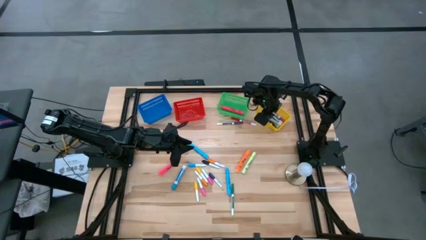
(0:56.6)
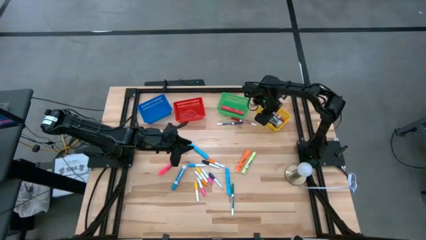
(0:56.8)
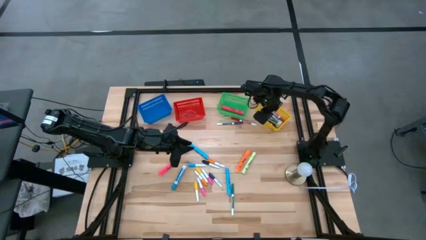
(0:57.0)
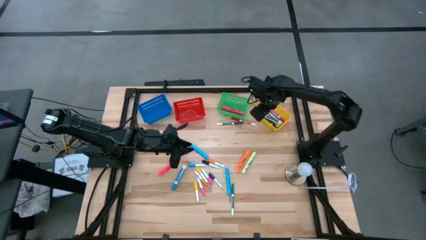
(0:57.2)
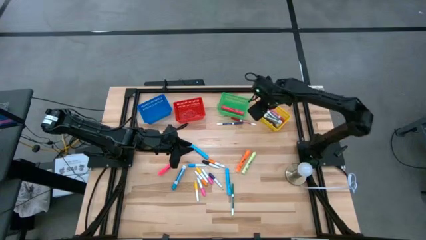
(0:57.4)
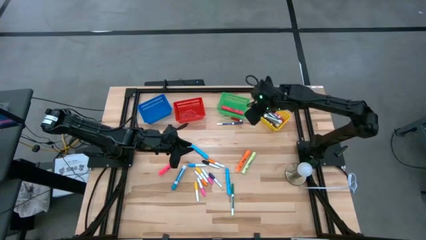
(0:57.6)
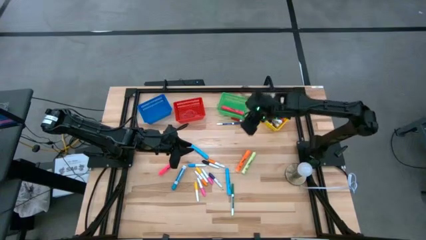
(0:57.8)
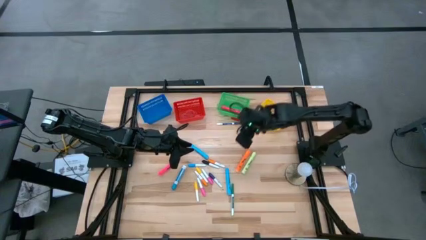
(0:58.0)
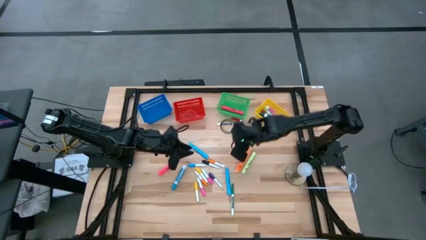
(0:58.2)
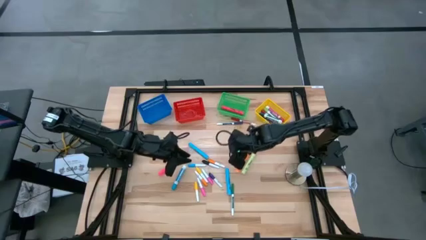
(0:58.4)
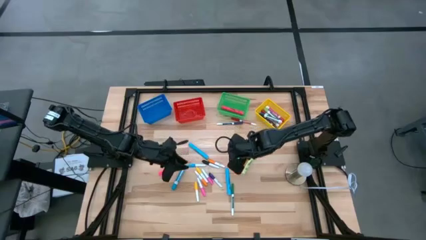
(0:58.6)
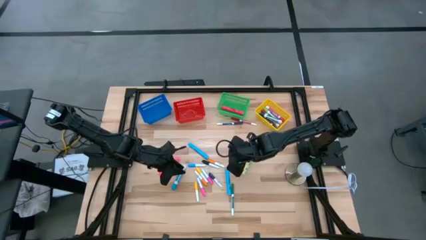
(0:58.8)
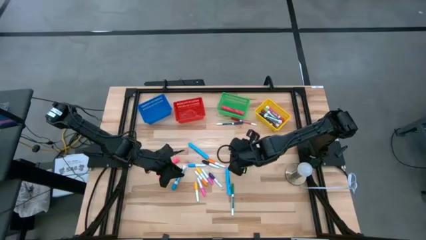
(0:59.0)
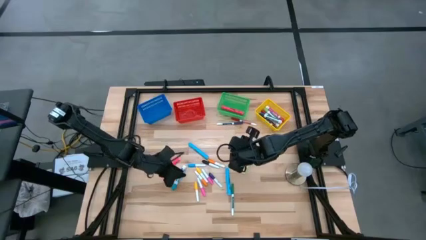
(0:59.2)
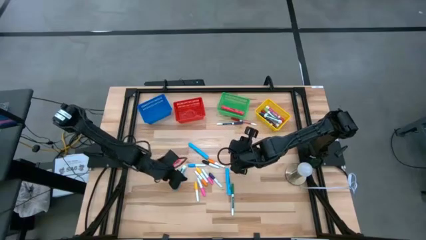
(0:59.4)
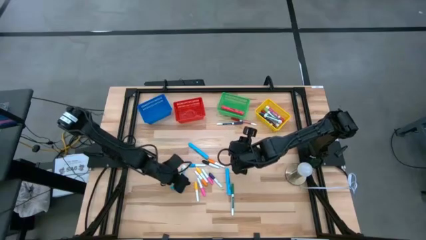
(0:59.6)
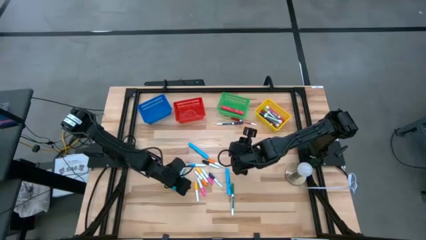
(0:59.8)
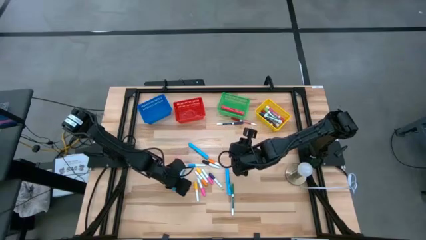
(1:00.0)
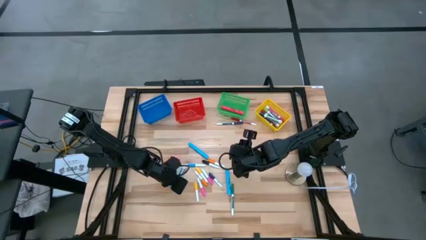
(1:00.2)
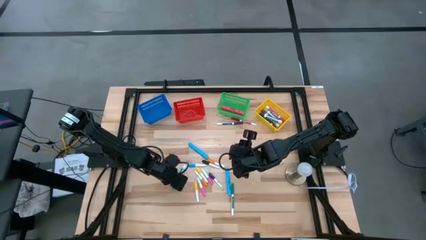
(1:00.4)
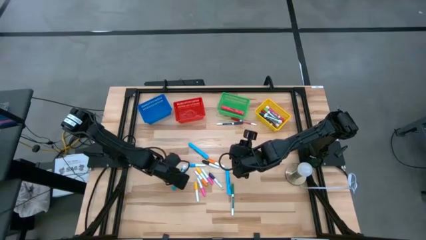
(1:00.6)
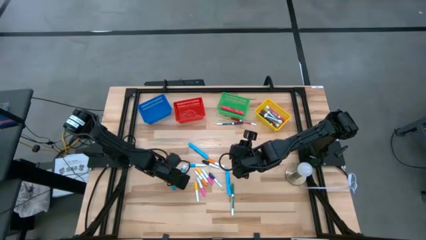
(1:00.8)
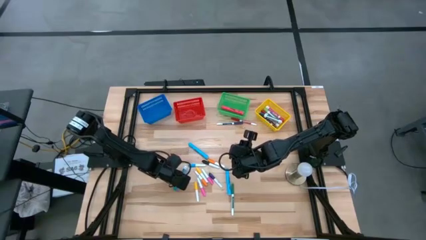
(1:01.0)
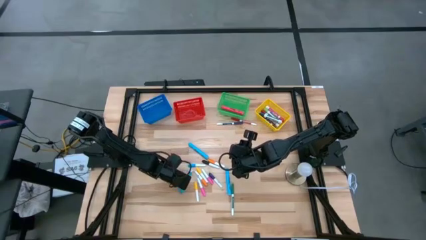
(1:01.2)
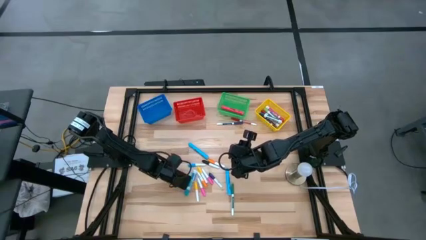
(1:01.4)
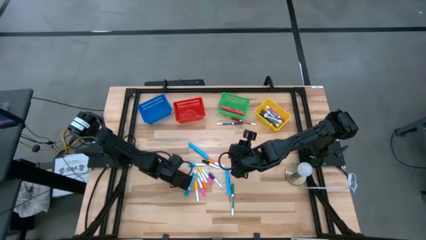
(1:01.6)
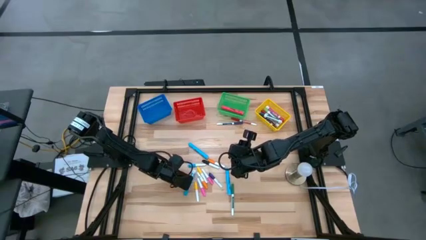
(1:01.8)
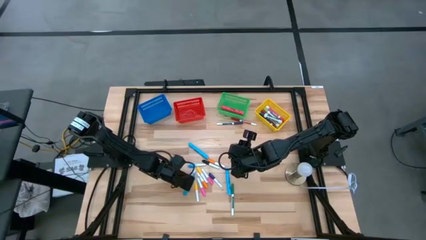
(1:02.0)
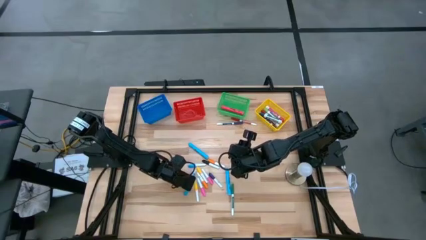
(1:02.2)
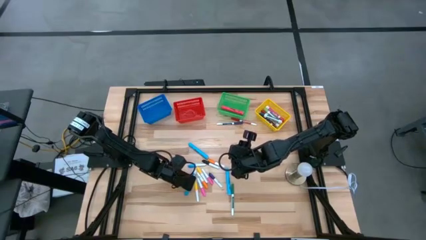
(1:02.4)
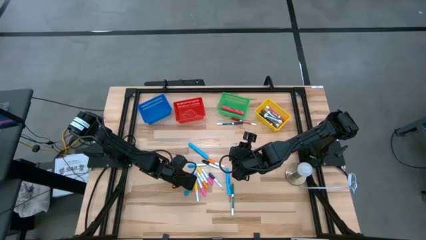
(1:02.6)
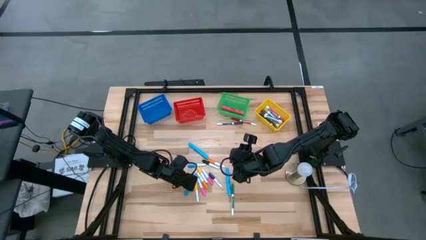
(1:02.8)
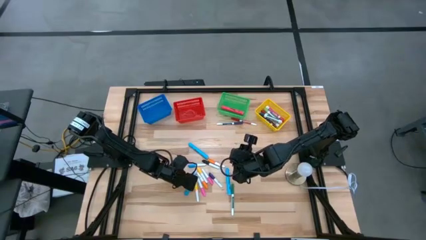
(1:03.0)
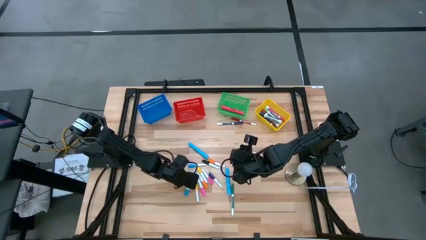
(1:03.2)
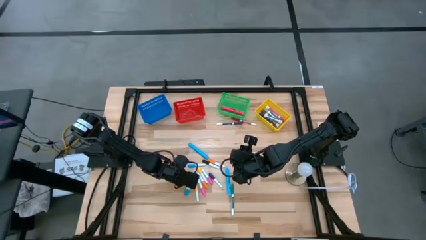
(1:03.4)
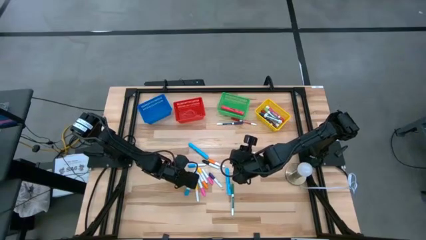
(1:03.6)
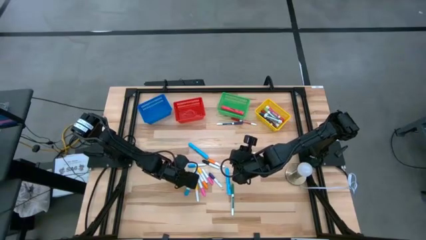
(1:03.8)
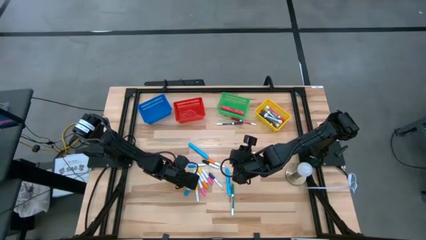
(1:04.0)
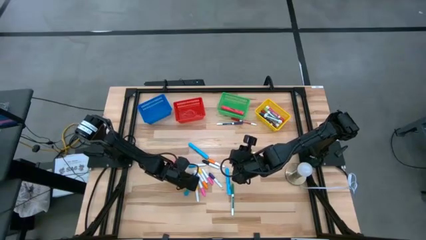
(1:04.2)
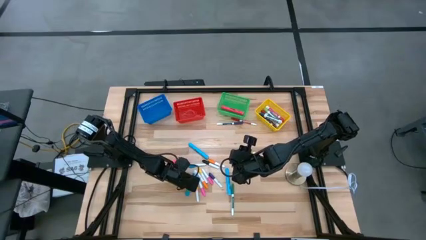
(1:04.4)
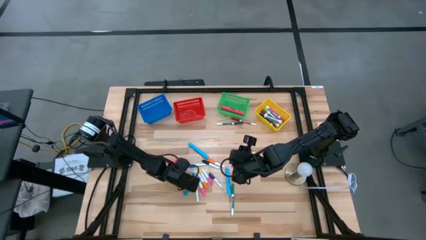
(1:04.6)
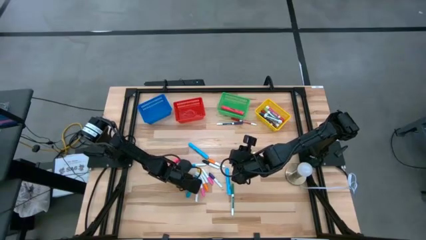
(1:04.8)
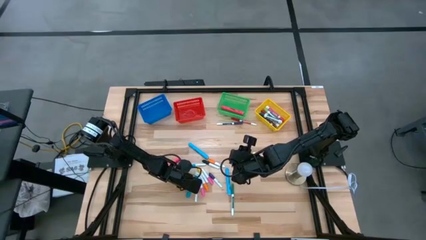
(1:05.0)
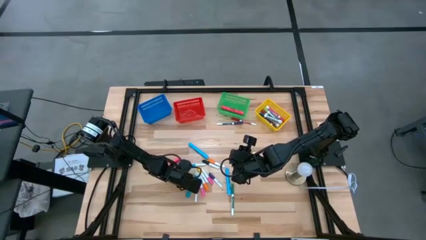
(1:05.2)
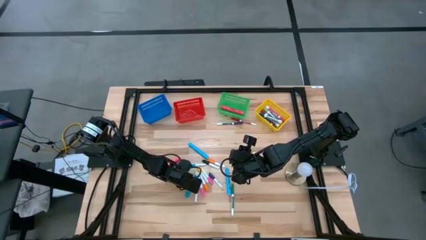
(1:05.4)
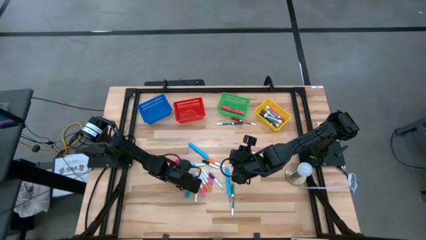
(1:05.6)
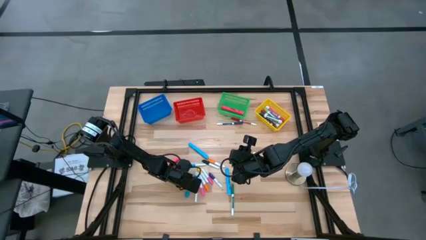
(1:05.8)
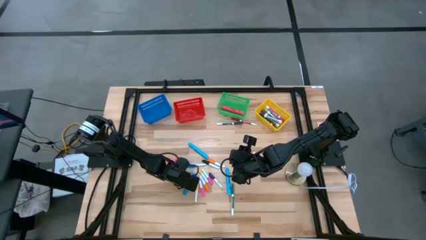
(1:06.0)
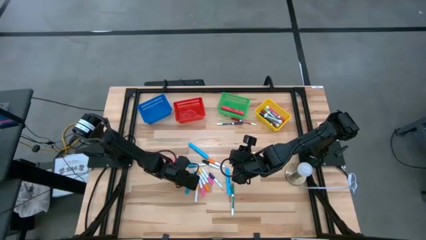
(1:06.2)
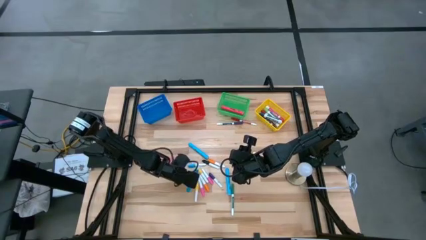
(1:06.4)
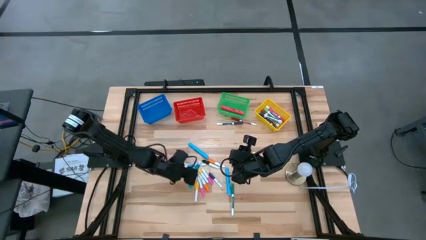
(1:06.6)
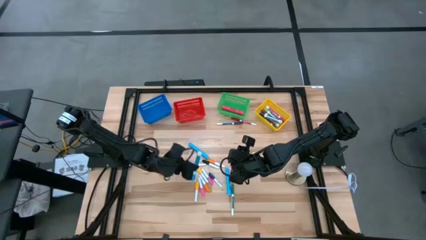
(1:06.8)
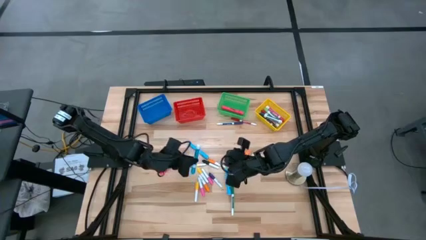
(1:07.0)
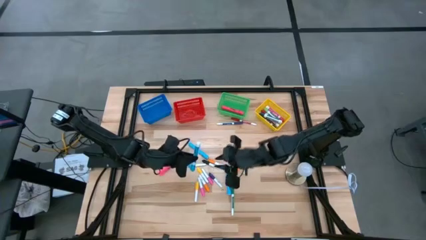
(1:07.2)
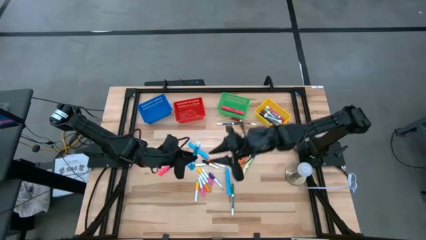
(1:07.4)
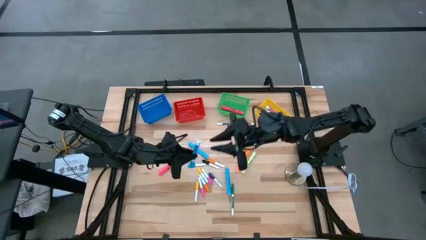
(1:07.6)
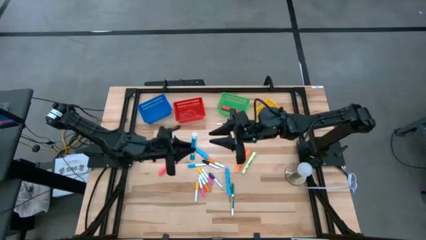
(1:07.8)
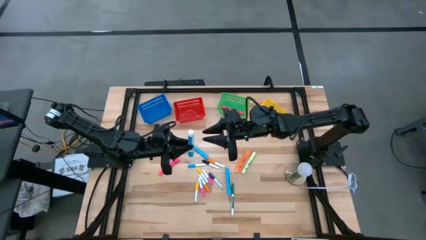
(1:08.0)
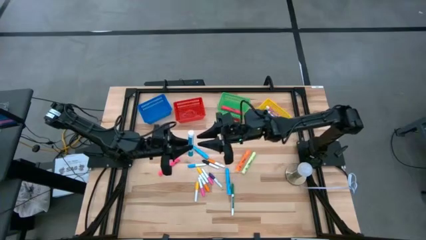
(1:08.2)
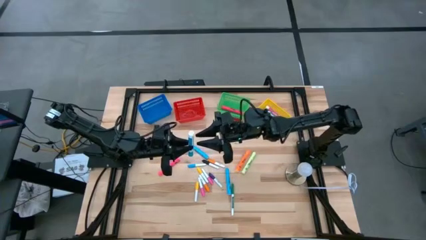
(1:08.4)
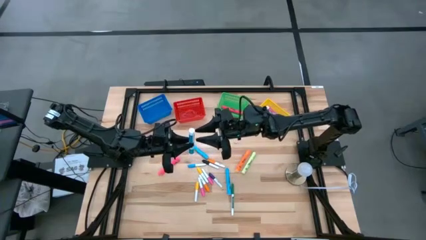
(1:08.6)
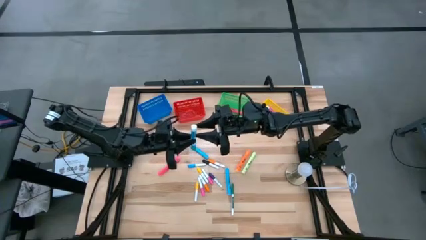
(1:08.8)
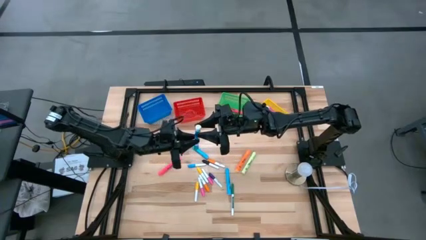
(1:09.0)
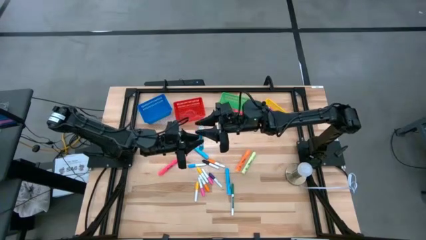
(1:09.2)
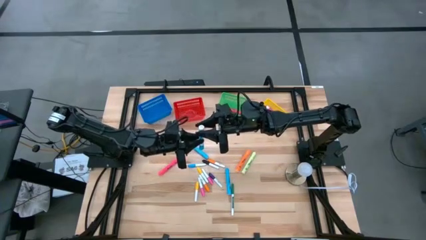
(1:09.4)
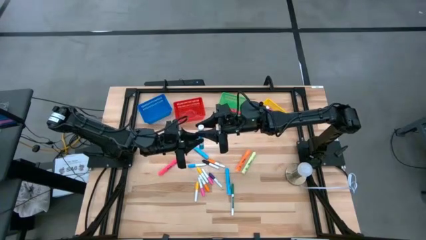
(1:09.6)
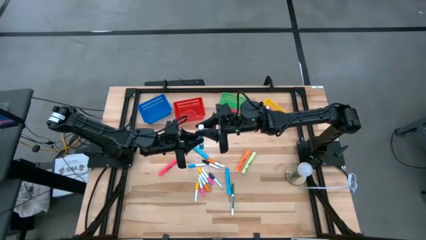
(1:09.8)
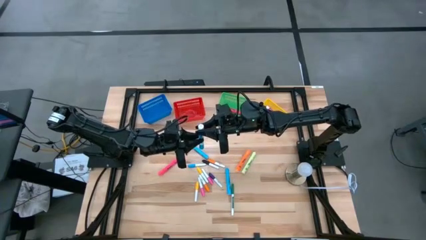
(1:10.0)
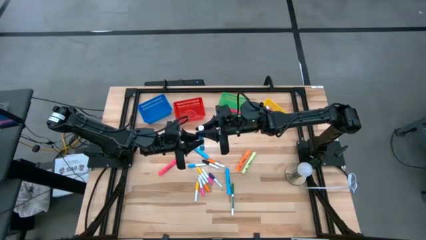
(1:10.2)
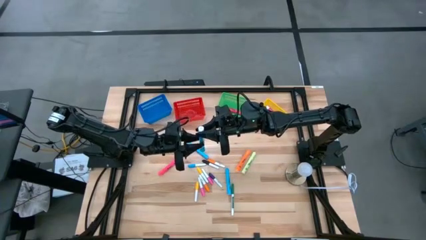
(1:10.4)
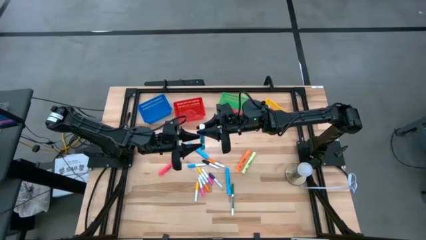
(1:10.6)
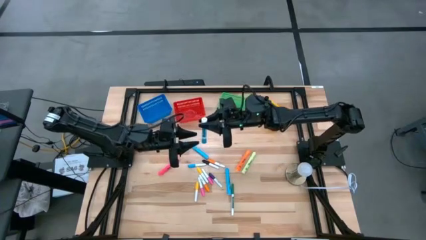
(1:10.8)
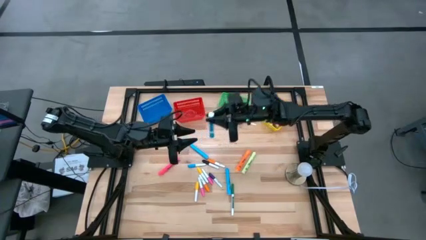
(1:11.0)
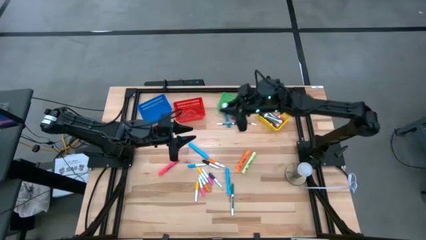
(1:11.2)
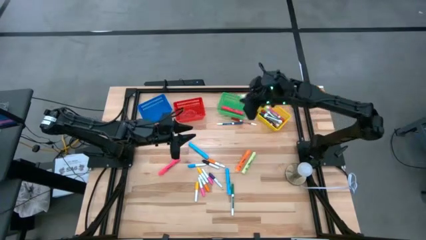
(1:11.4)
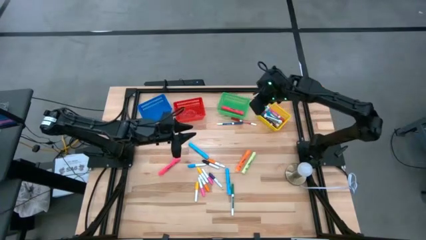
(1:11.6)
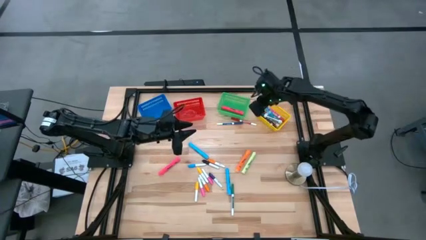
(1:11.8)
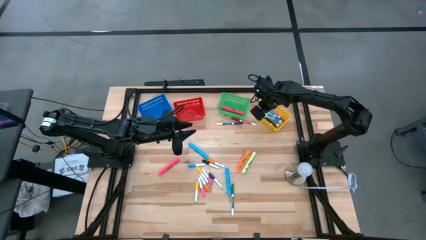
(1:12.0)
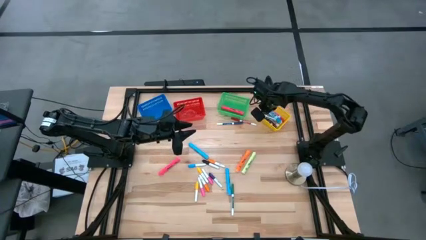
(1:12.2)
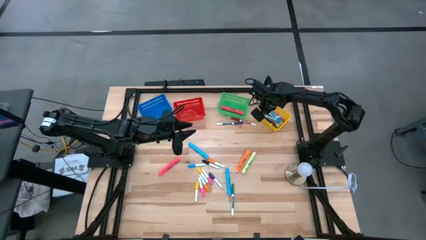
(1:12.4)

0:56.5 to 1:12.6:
Task: Pick & Place Markers
Put the large light blue marker pen into the yellow bin

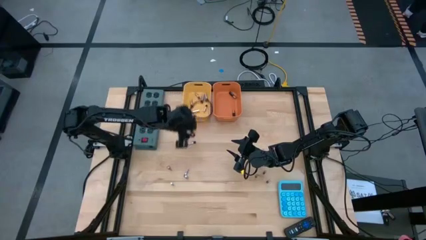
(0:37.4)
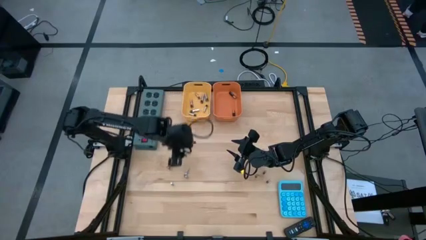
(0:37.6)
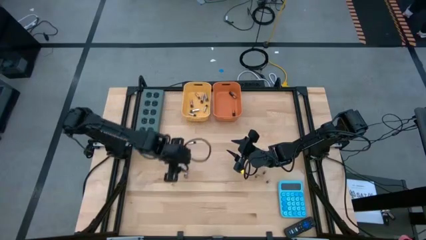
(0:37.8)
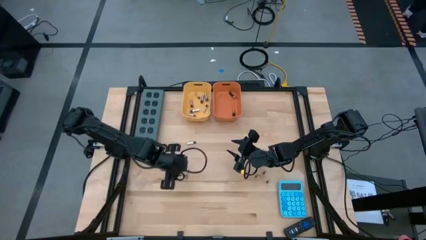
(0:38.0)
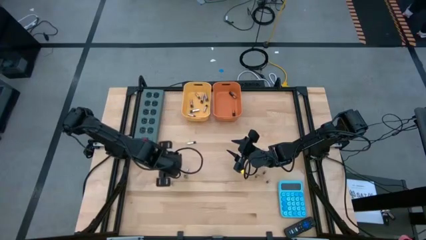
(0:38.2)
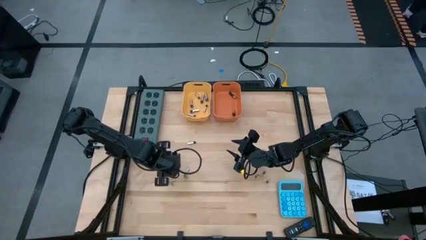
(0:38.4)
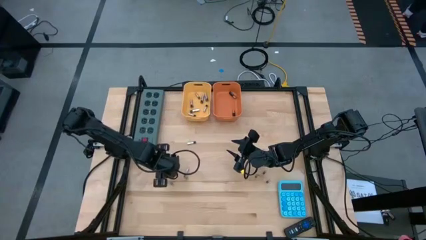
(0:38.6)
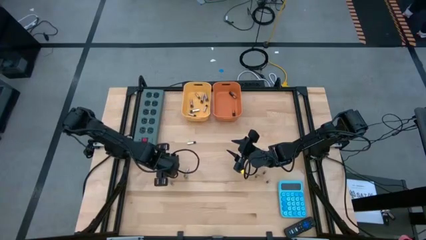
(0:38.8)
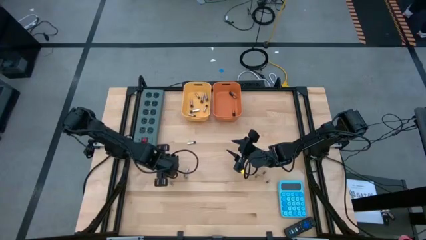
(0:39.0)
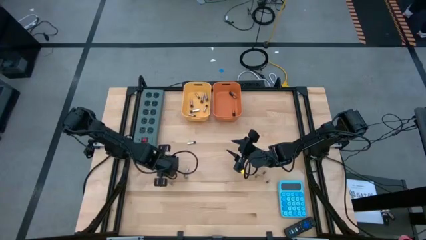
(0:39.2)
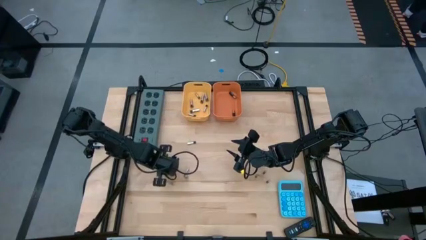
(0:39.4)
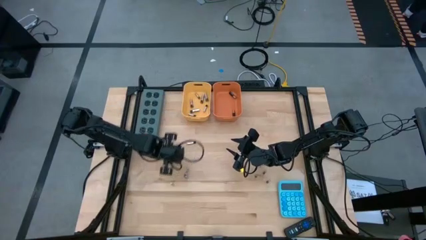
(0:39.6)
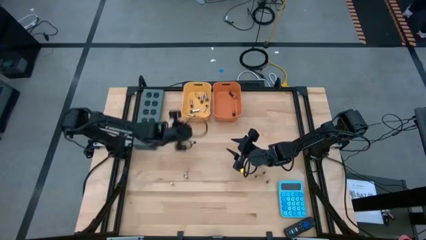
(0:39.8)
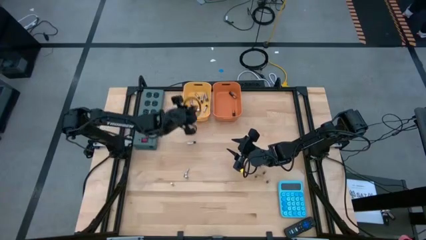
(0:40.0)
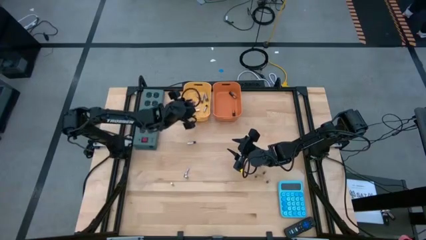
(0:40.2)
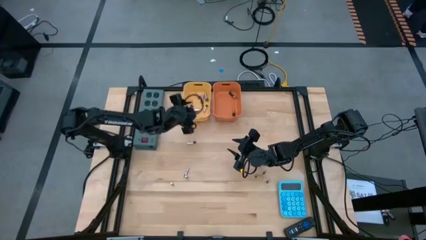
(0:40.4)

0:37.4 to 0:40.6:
Task: Sort batteries
Put the silver battery into the yellow bin
